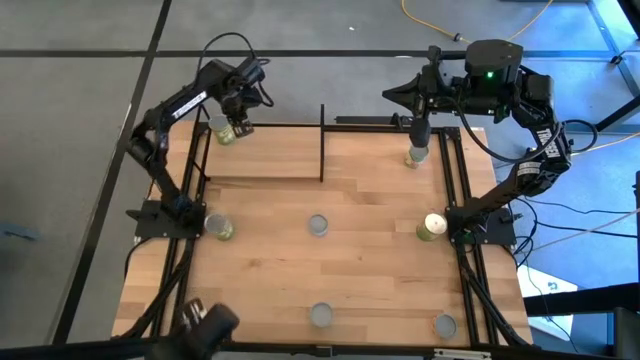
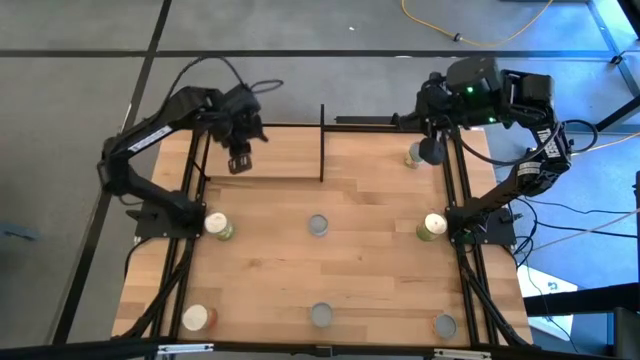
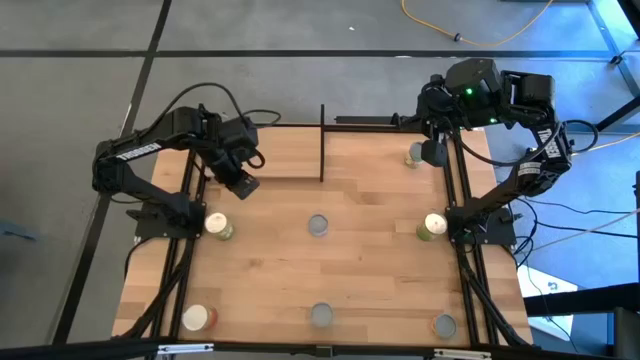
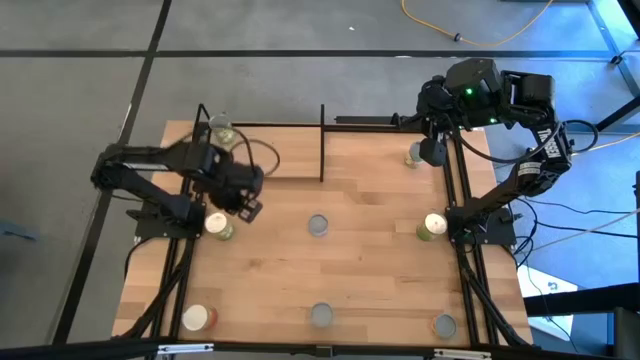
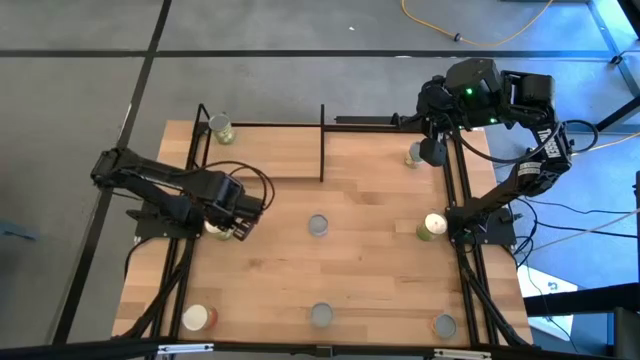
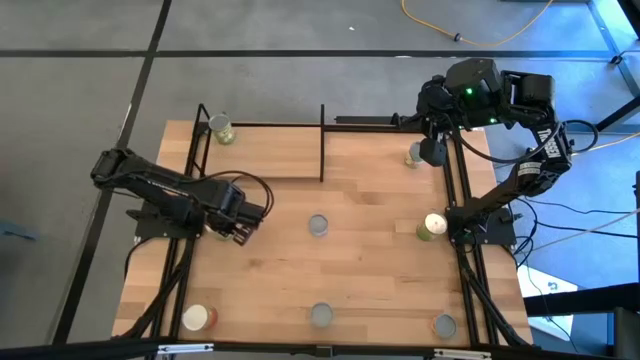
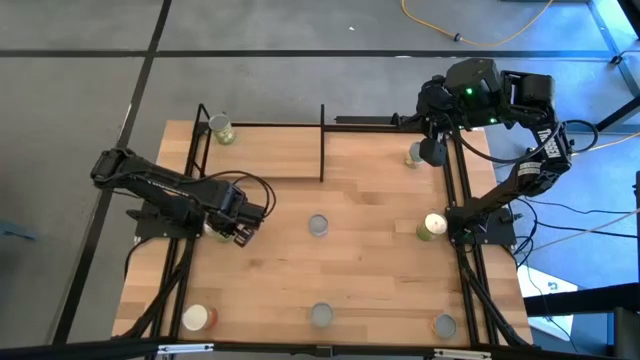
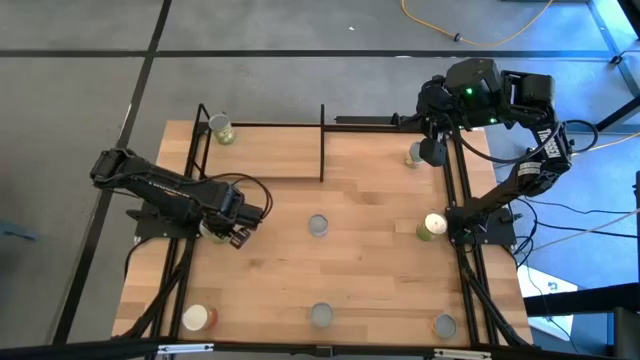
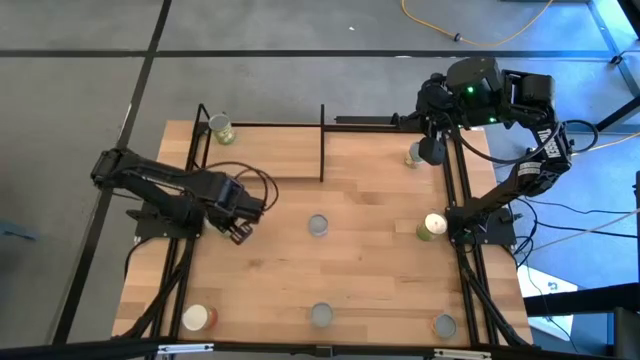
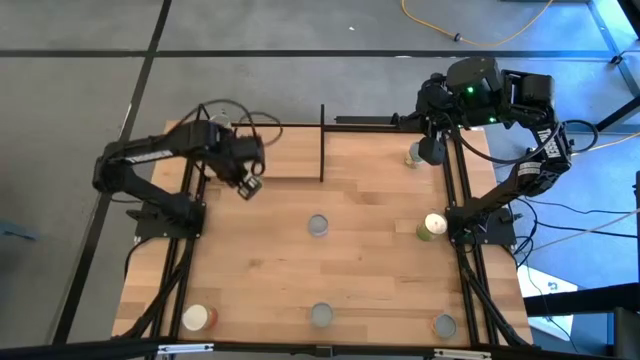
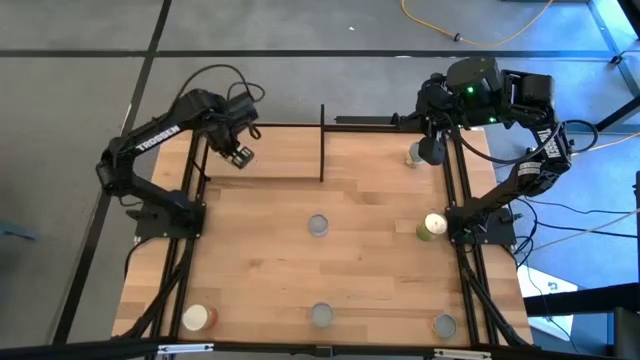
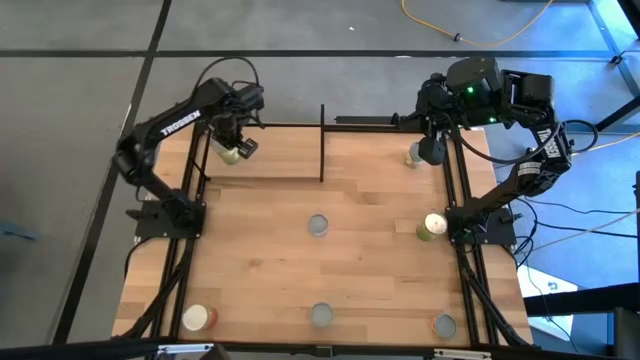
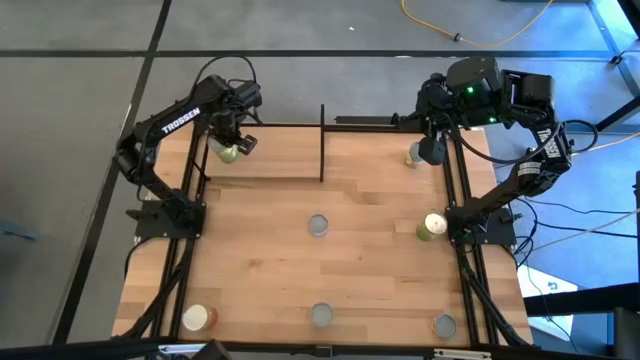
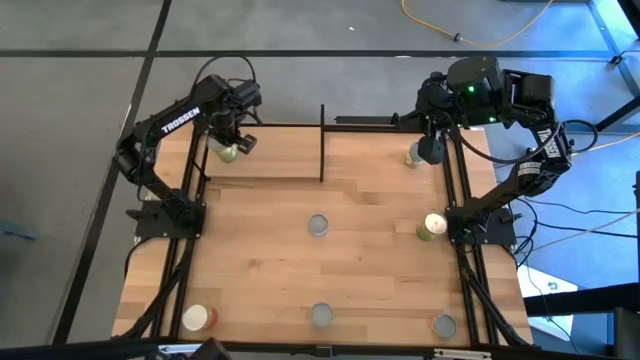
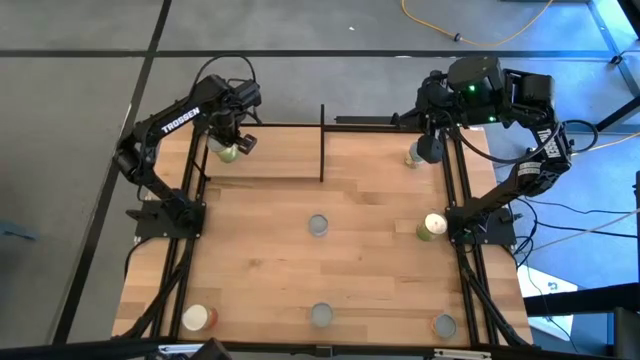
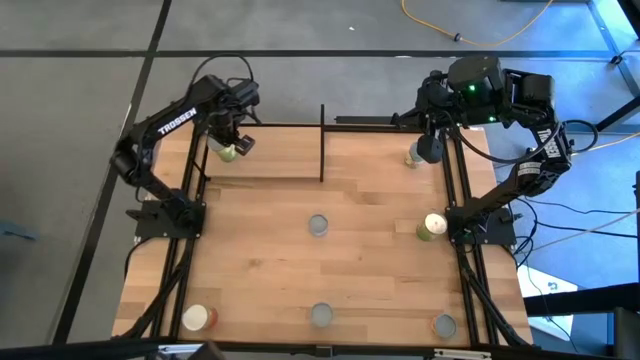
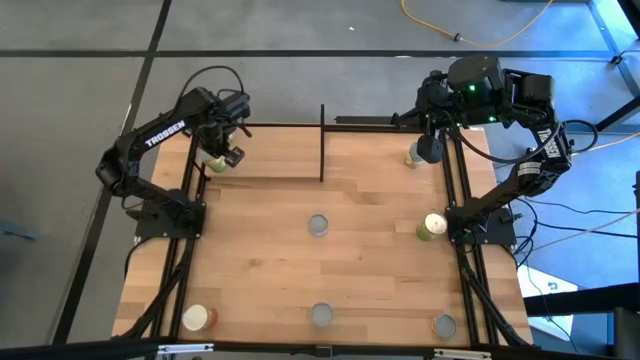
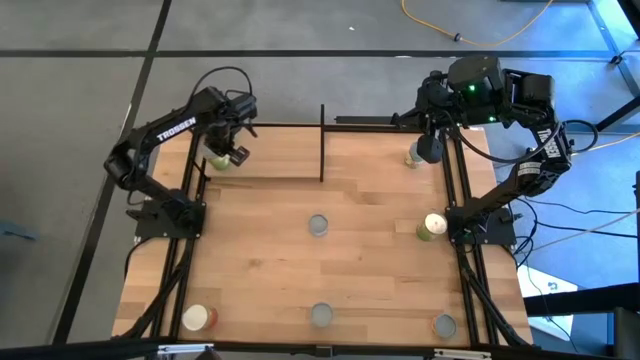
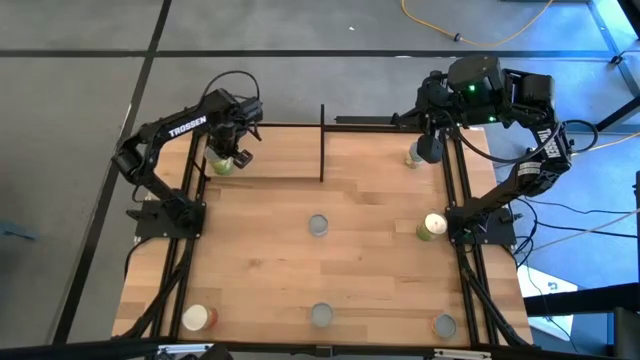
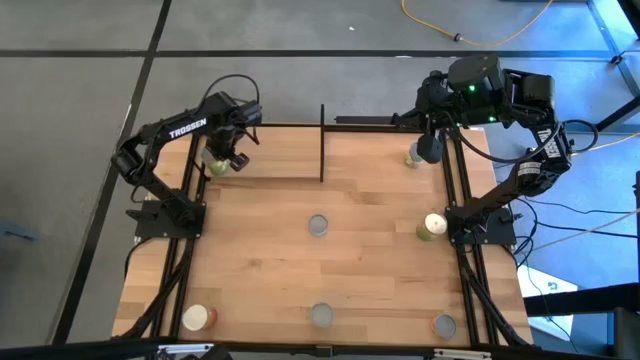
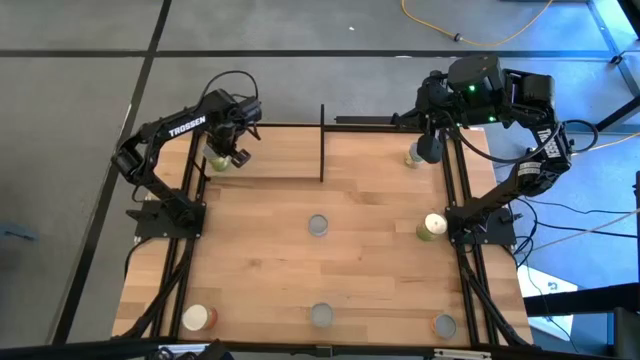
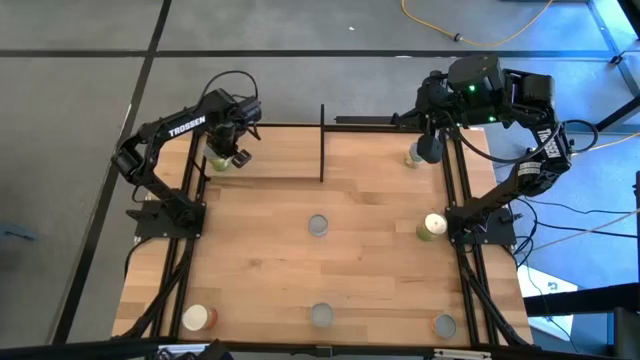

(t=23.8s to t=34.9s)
Task: Pick and place cans onto a shelf
Put the canned pears on the shelf
